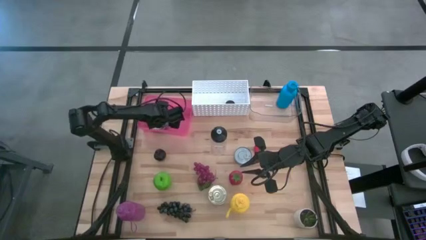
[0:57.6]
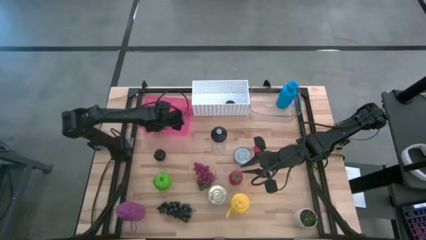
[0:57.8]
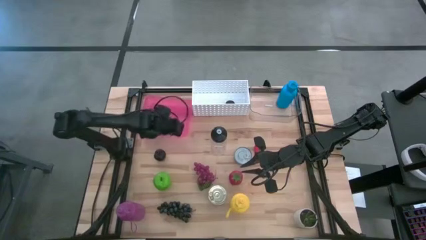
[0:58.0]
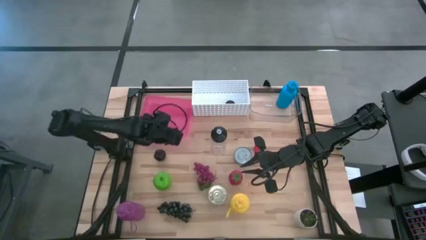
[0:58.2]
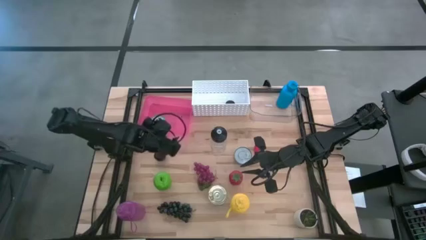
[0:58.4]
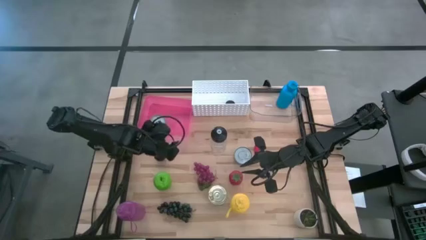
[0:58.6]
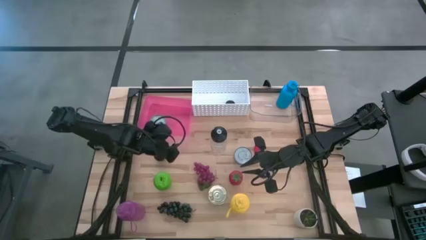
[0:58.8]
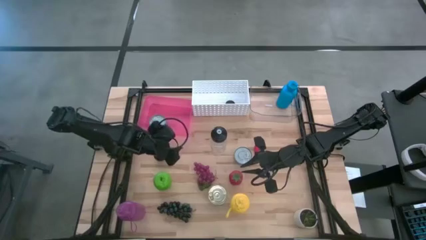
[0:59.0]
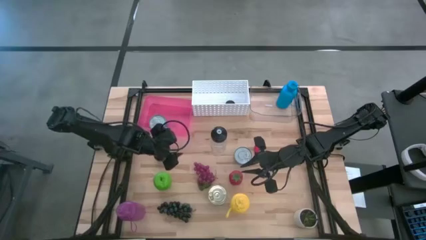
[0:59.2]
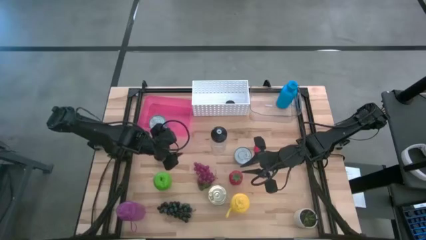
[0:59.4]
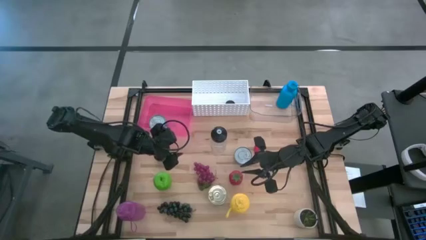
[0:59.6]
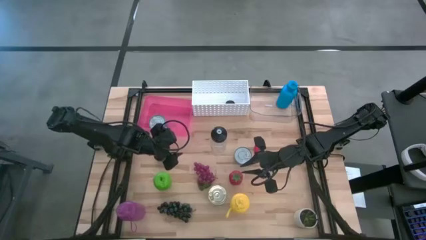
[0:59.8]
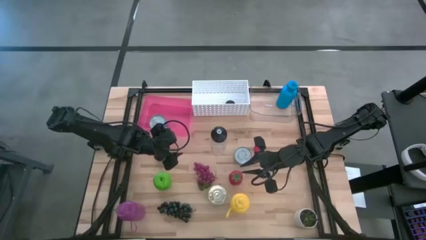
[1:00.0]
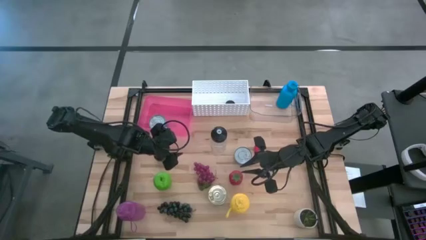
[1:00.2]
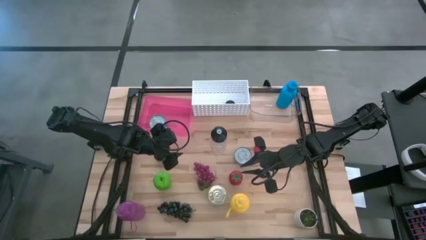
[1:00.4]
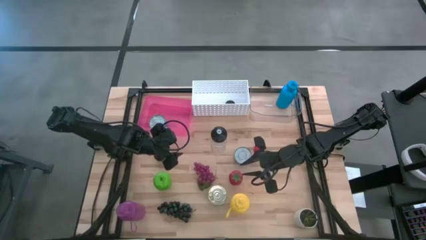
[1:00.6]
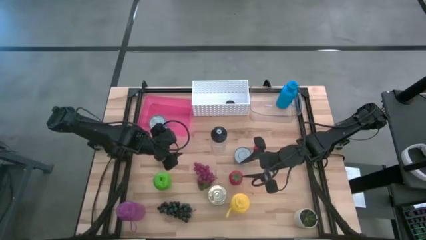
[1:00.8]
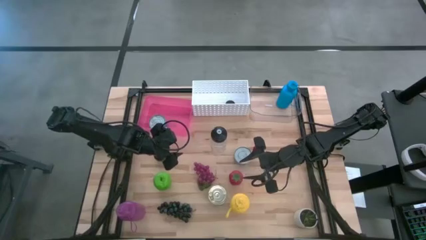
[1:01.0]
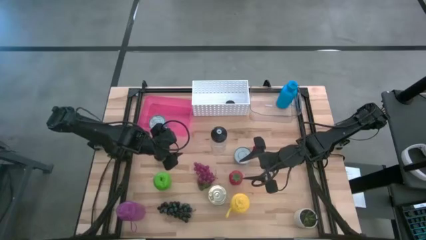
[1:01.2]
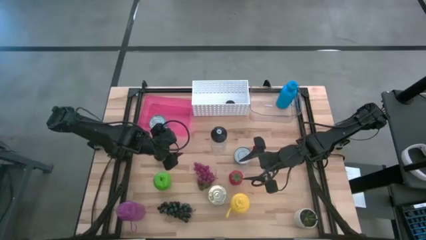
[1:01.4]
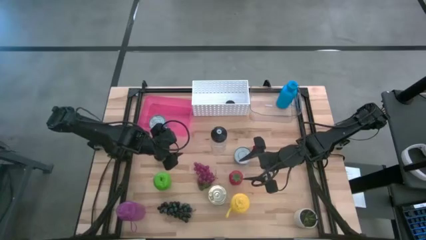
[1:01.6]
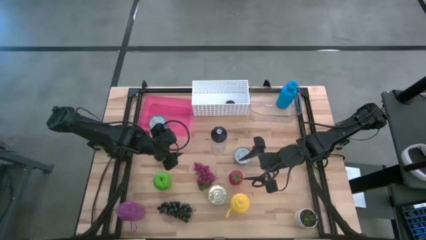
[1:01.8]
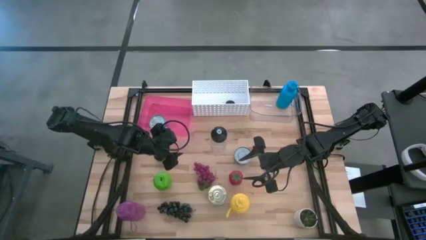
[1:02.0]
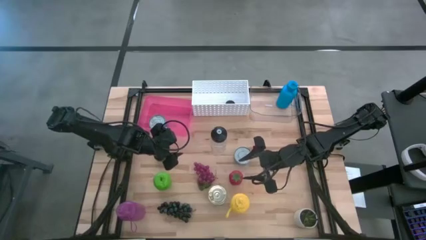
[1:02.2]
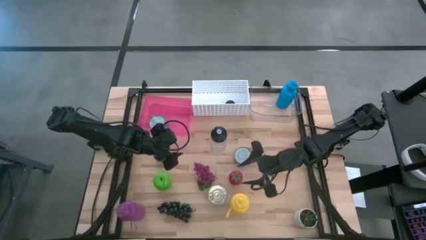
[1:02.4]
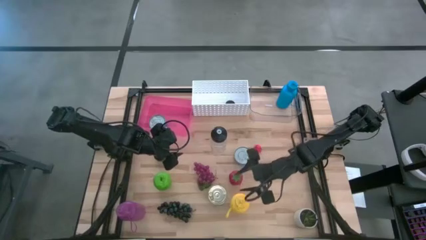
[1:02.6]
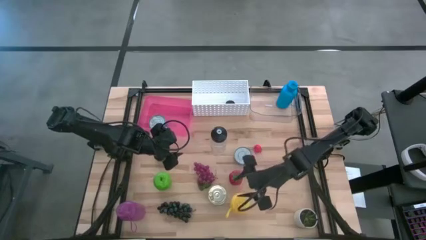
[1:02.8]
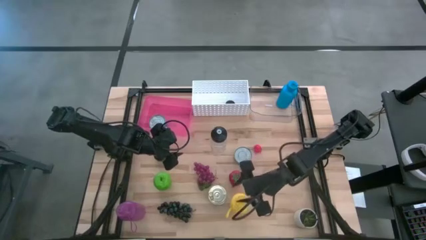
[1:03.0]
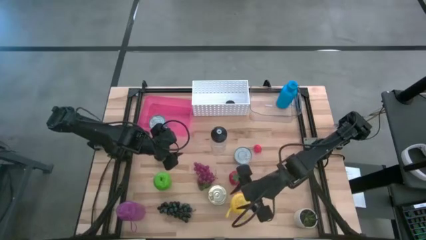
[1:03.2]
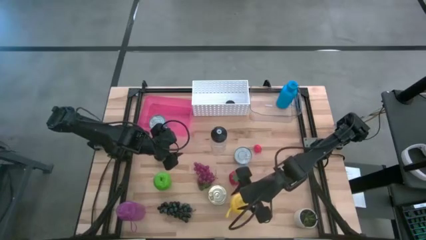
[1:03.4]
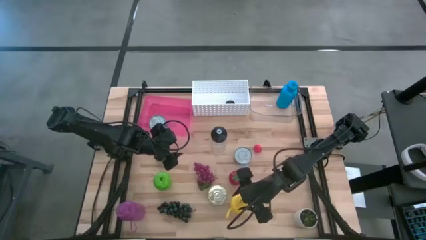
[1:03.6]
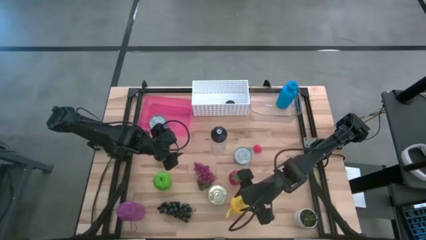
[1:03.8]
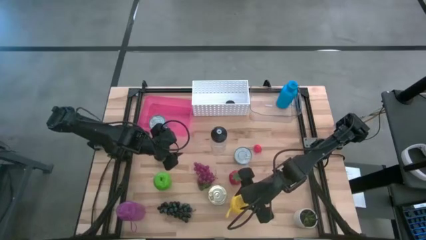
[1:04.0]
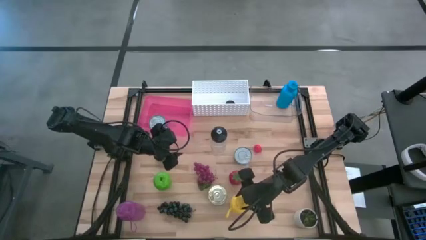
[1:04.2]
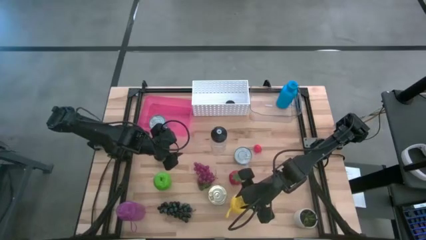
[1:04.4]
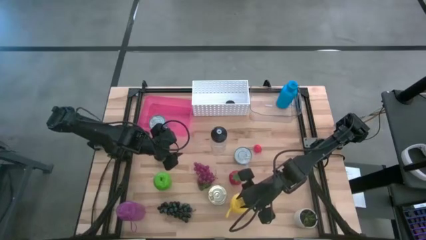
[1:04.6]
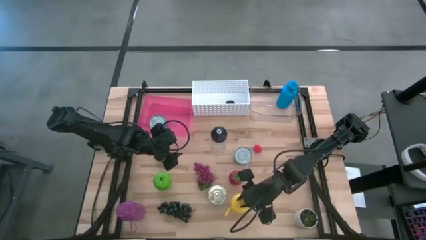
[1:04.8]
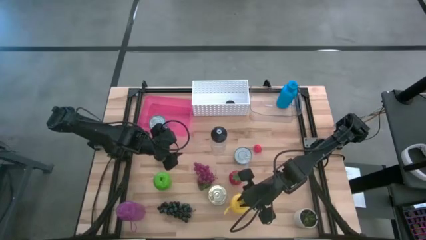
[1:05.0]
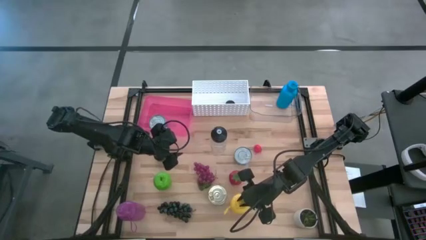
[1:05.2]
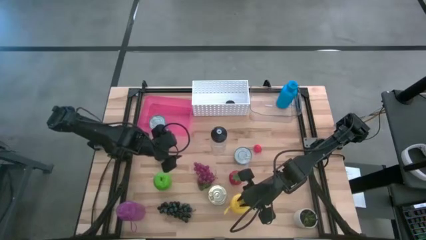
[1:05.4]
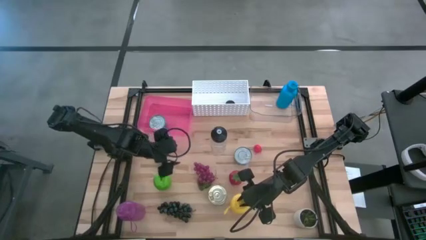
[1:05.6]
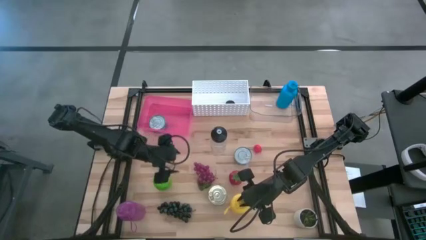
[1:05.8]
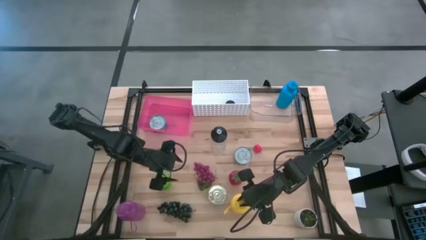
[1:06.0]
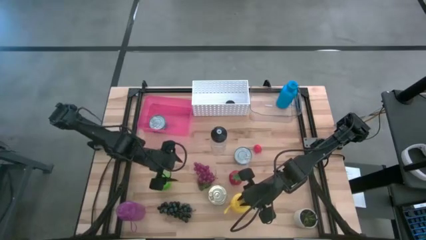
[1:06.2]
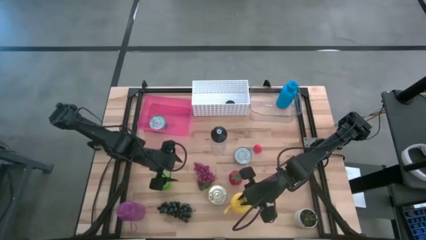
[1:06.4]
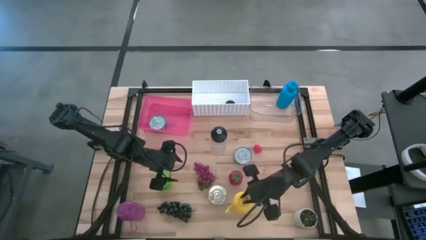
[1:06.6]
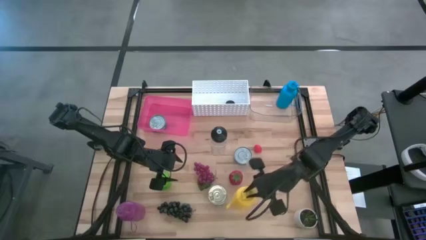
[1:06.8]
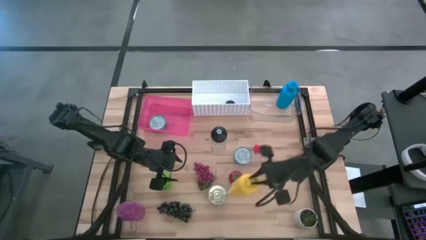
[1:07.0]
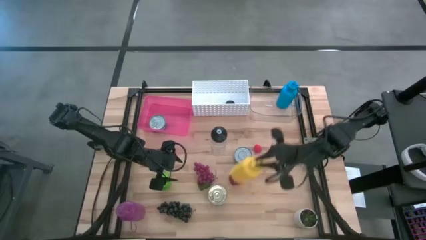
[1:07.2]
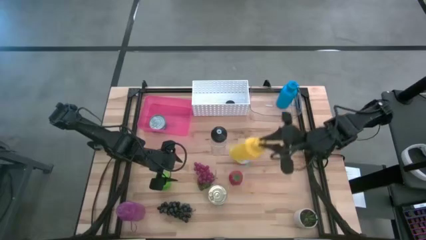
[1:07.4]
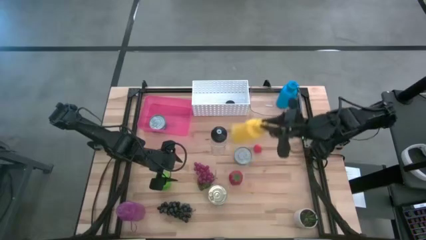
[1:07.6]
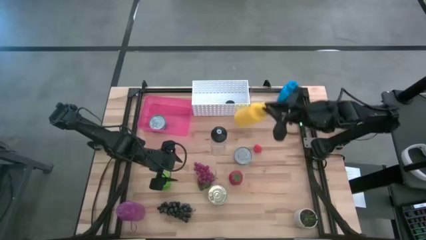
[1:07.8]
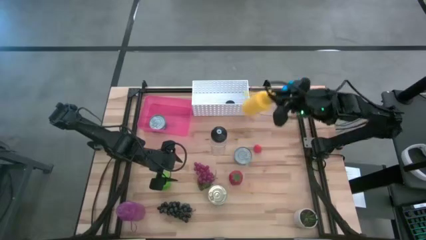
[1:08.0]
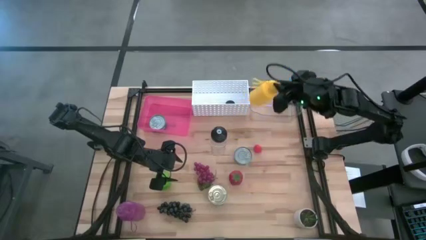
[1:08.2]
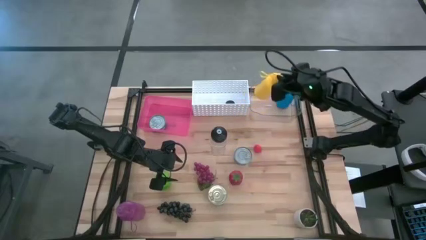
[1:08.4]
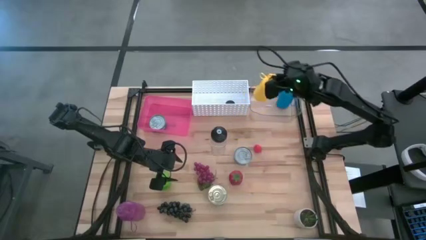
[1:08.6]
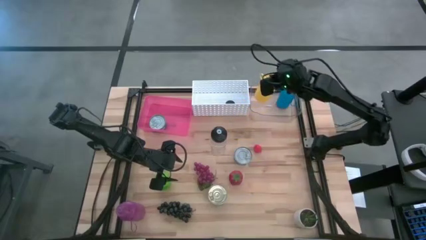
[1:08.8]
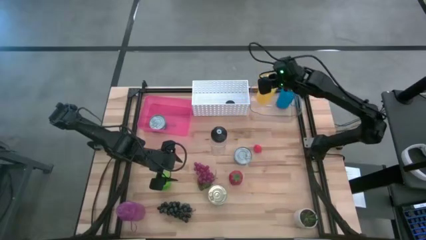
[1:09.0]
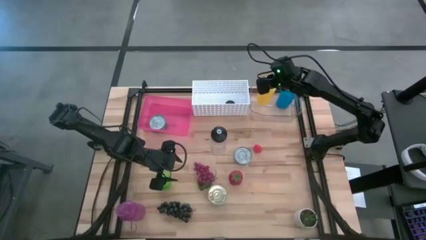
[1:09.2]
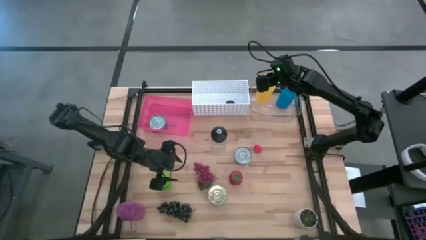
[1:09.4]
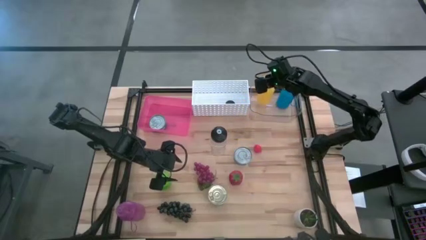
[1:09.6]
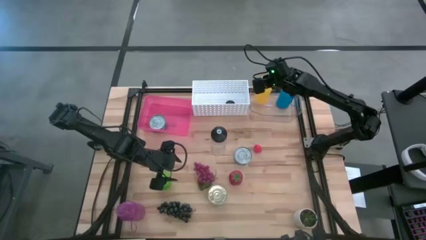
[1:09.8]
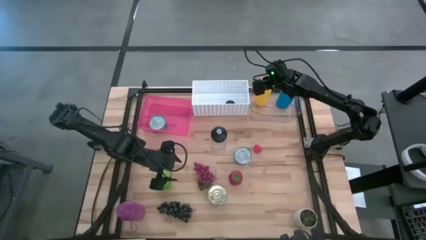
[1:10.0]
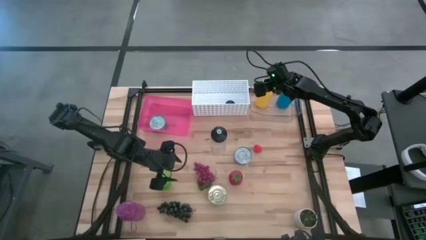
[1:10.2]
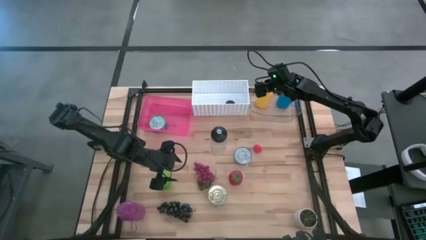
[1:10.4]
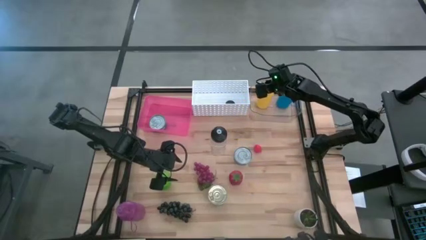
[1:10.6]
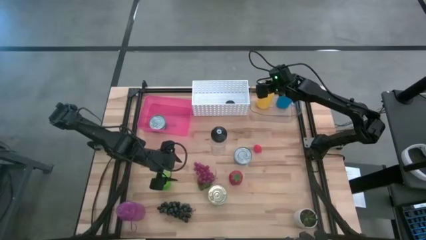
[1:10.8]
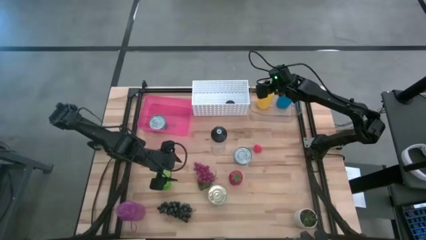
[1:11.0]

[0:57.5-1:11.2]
Task: Pick & Place Food Item
Put the yellow water bottle into the transparent bin
